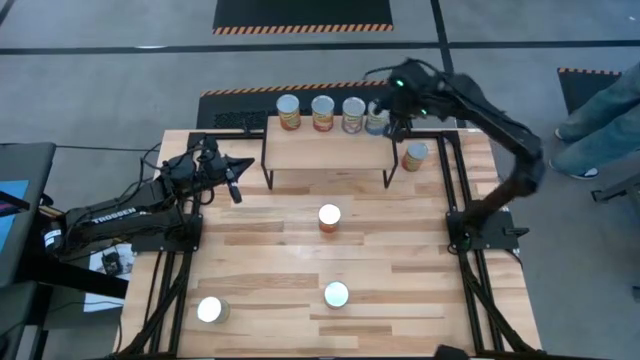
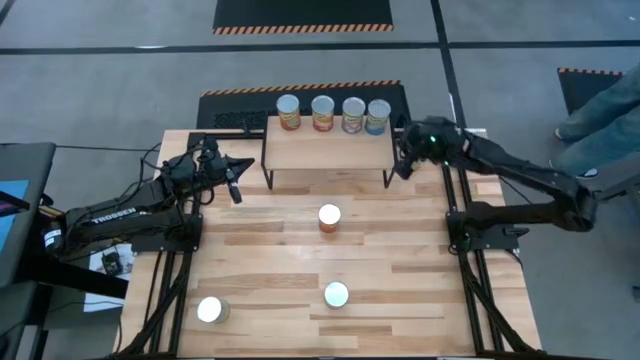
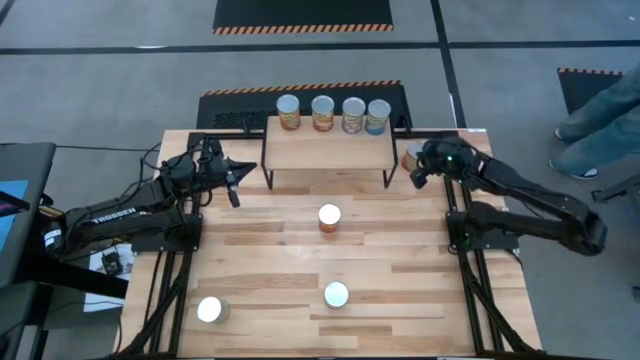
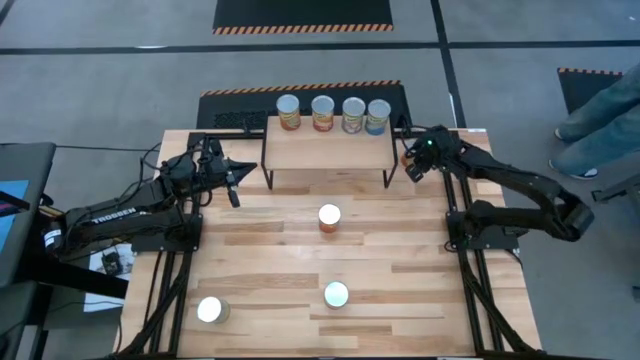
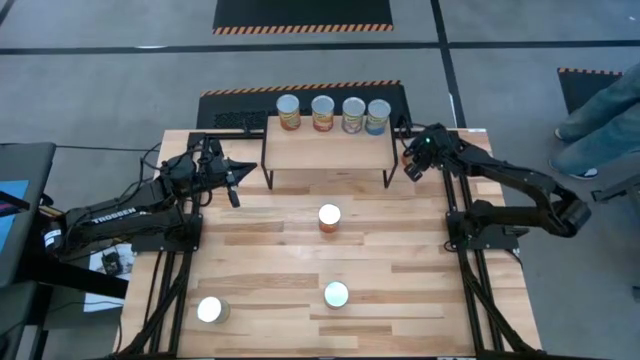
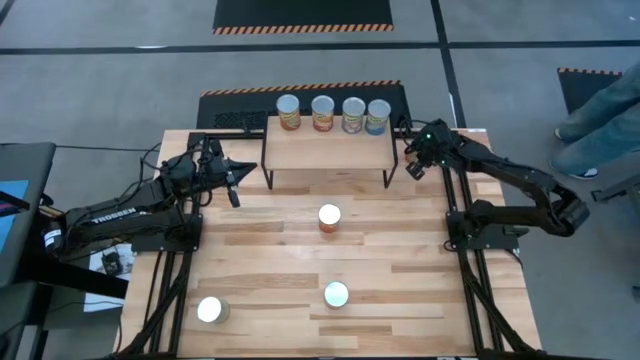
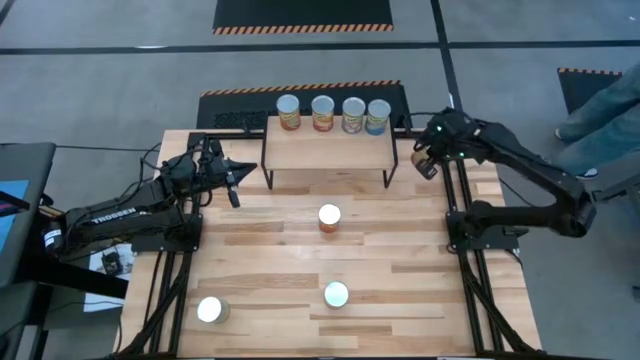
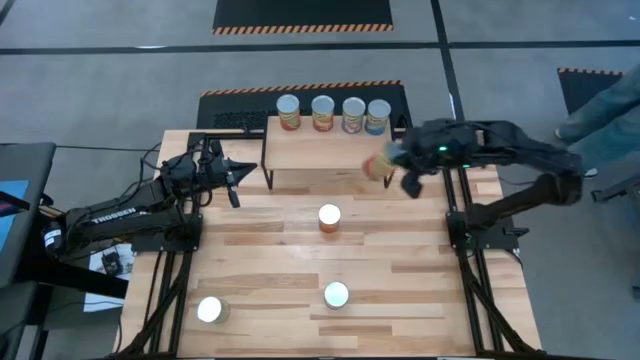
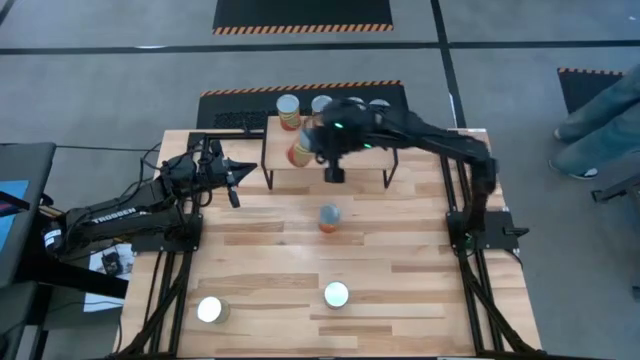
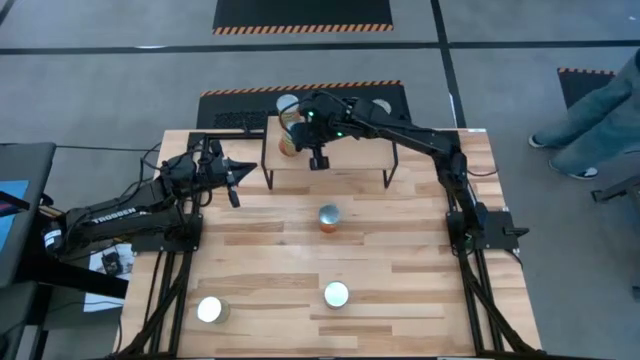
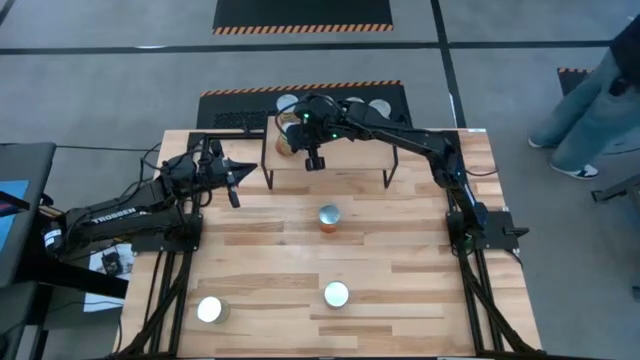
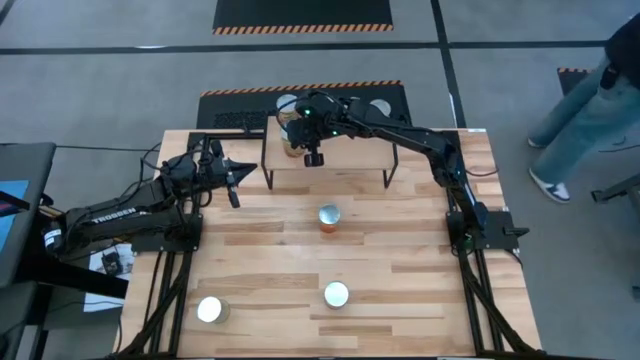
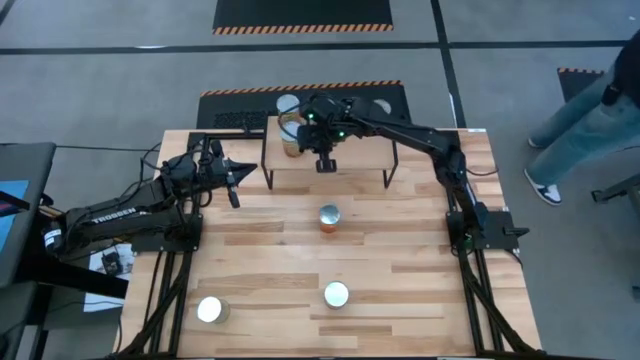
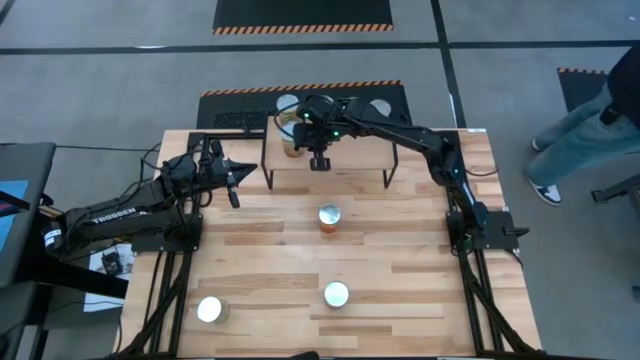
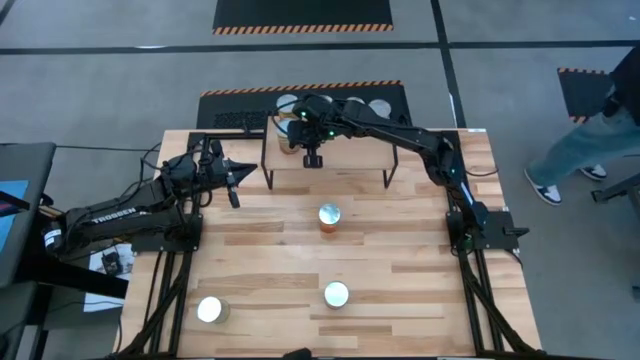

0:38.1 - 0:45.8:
Task: Pick and place cans onto a shelf
Put the canned green beans on the shelf

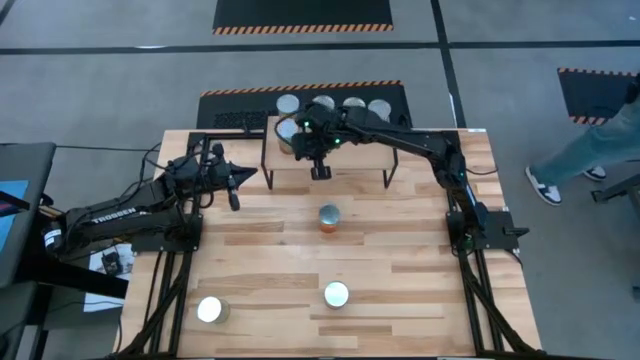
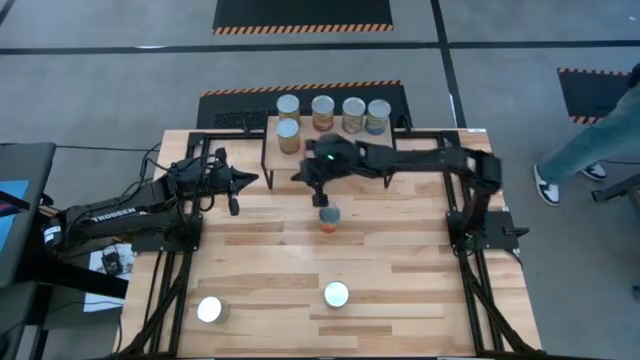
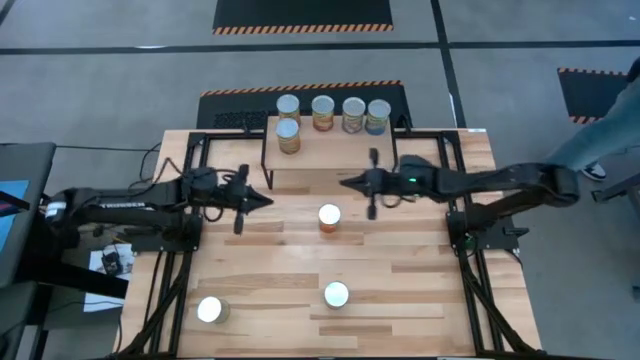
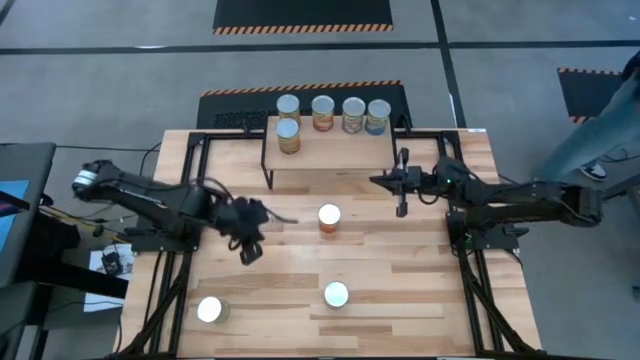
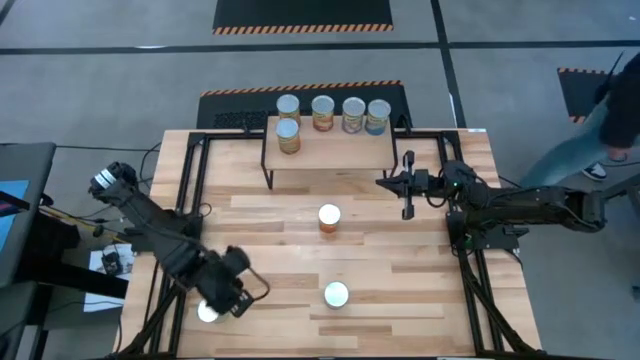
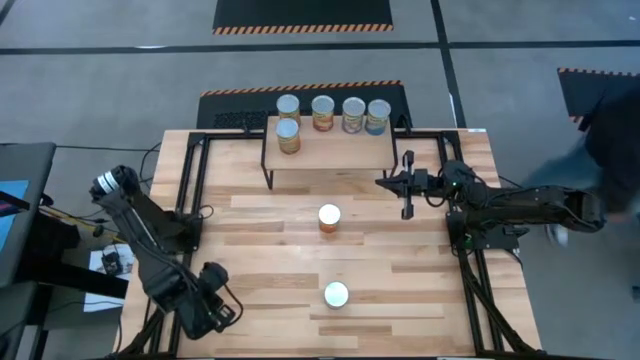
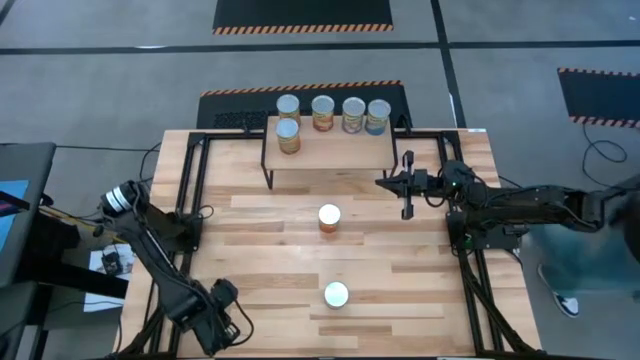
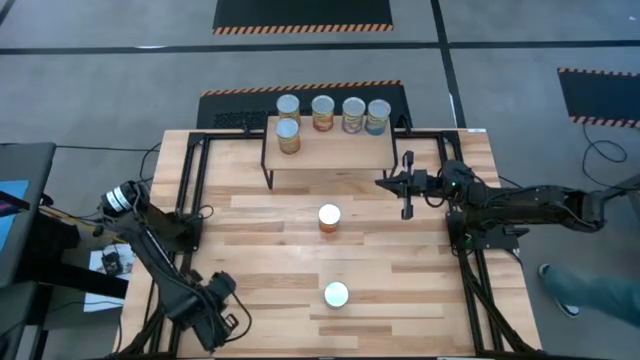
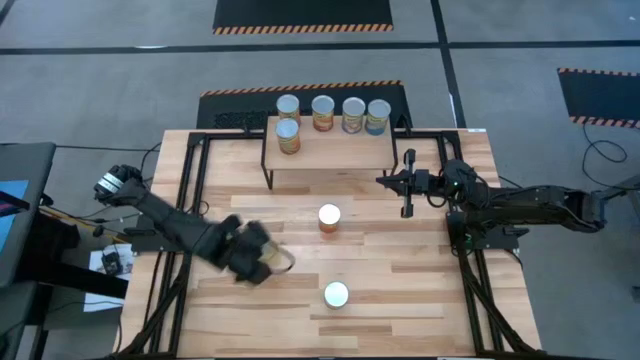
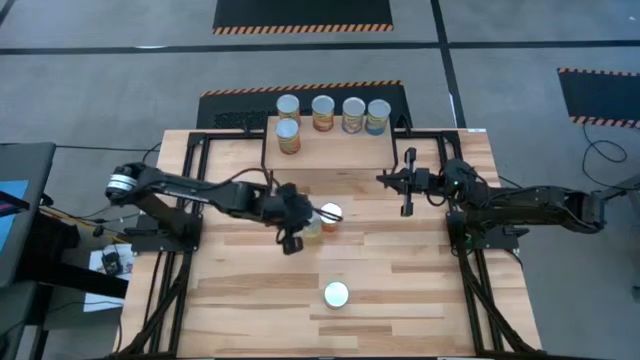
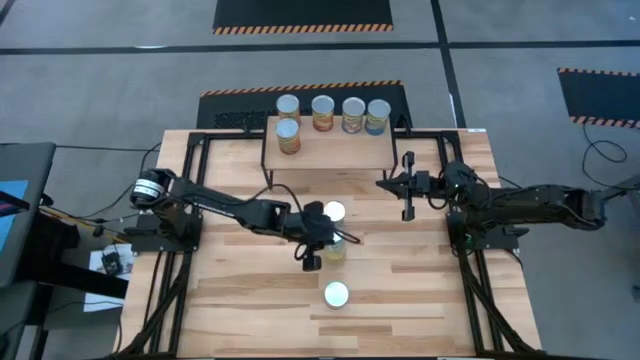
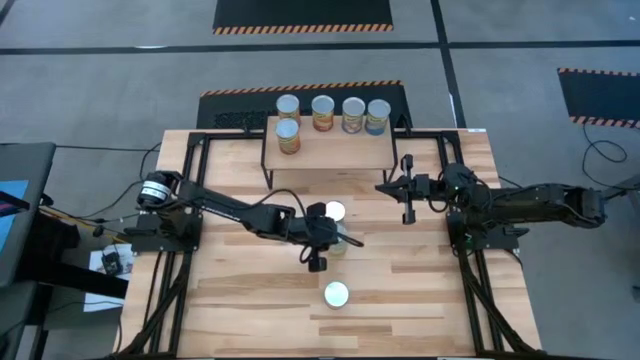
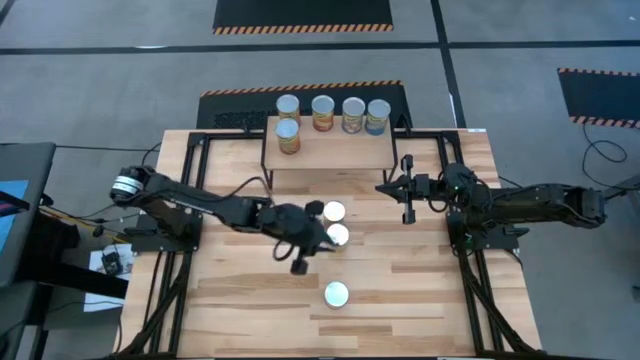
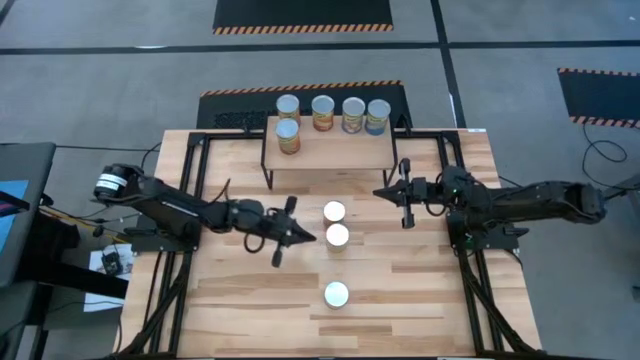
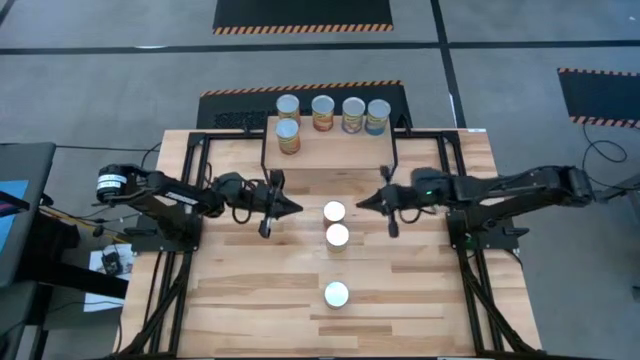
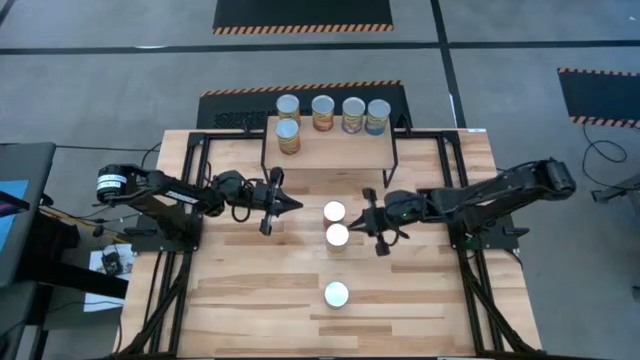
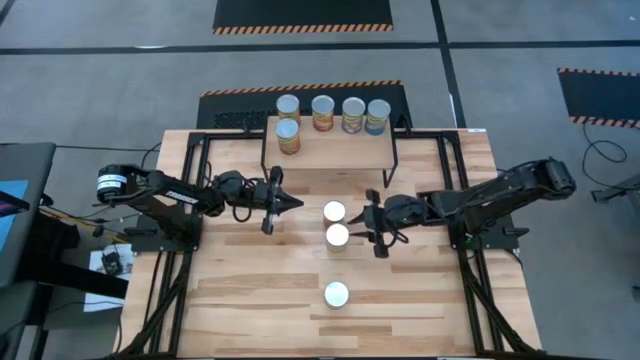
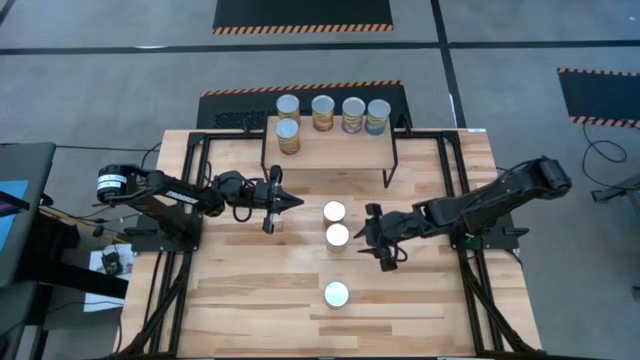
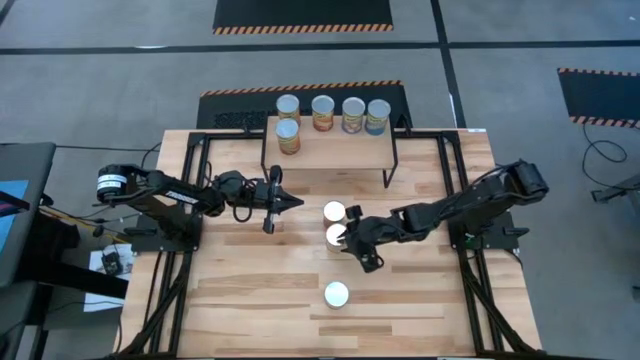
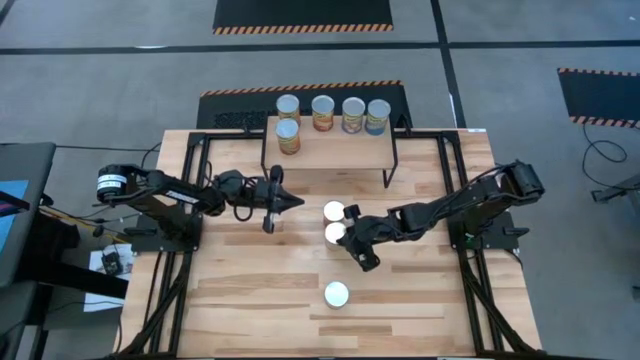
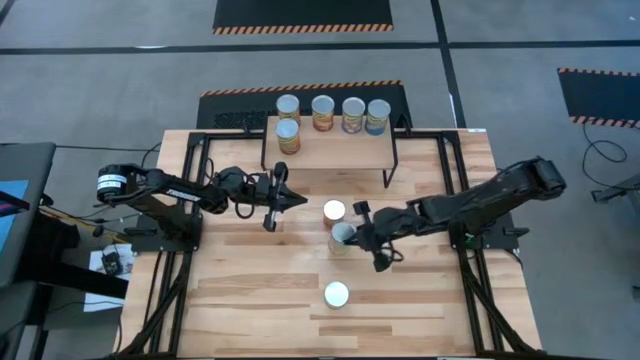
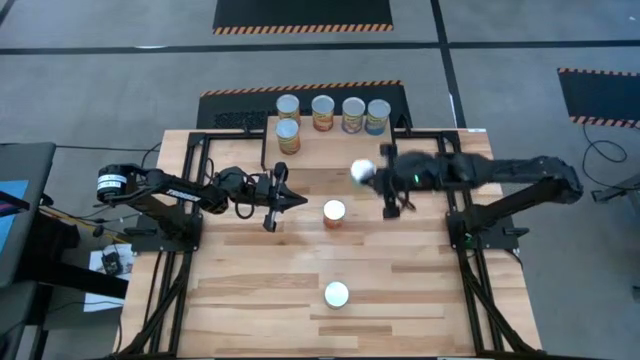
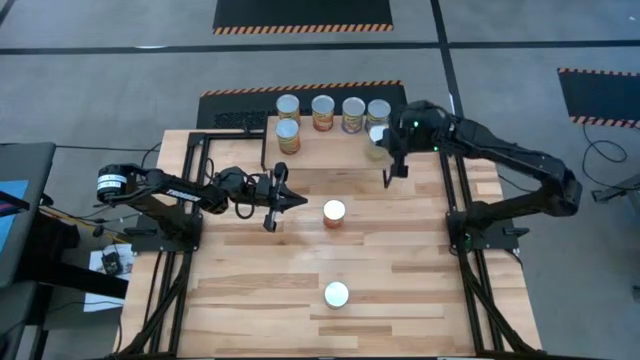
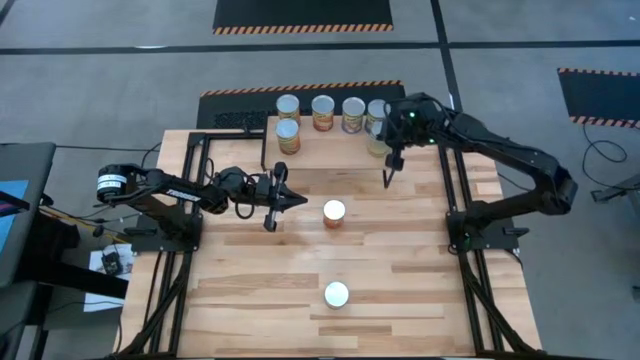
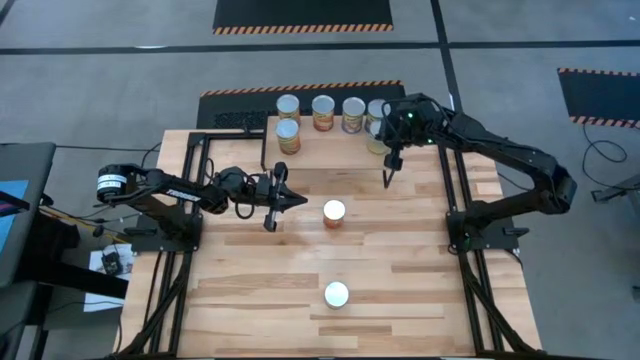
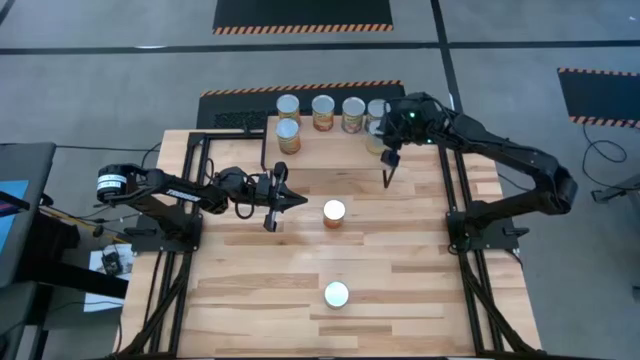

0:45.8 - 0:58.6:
Put the canned carrots on the shelf
